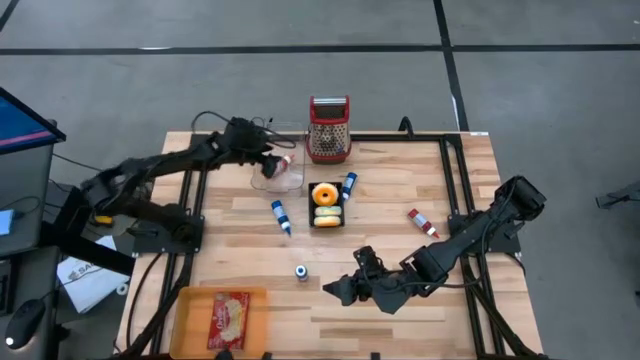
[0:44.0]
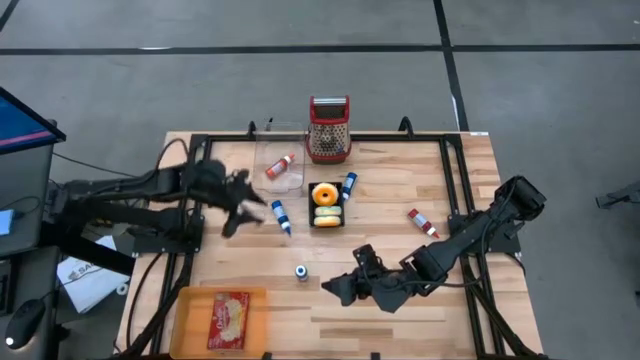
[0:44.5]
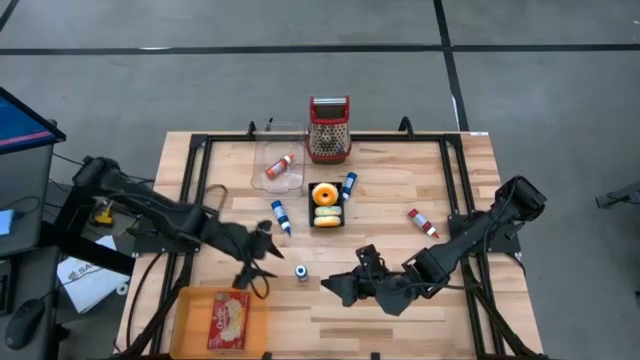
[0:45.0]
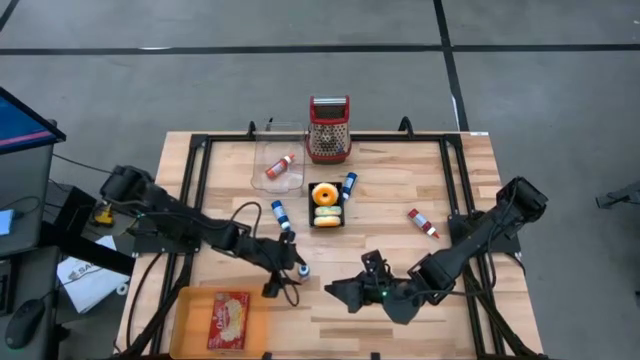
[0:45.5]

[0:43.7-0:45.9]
Put the bottom blue food coloring bottle into the transparent bin

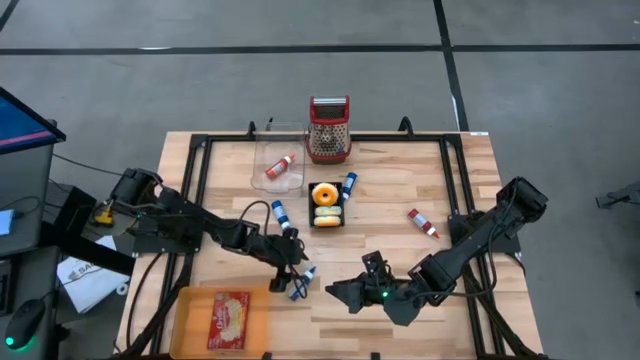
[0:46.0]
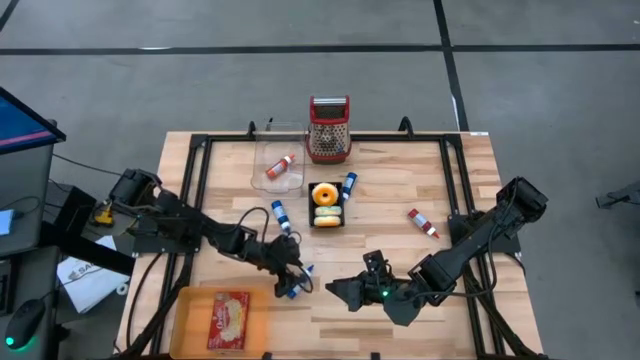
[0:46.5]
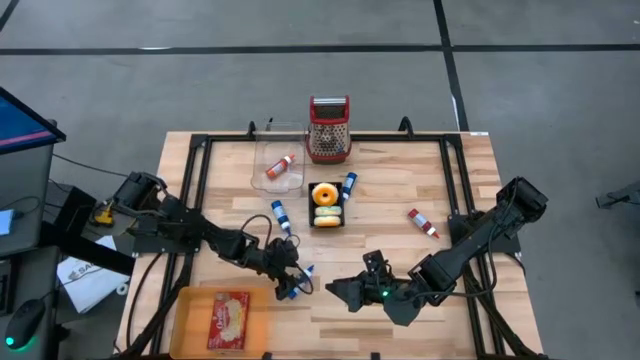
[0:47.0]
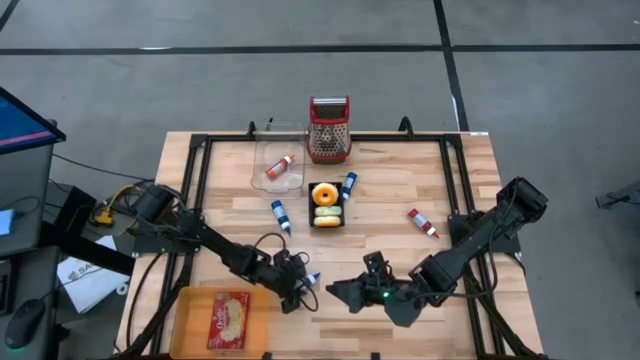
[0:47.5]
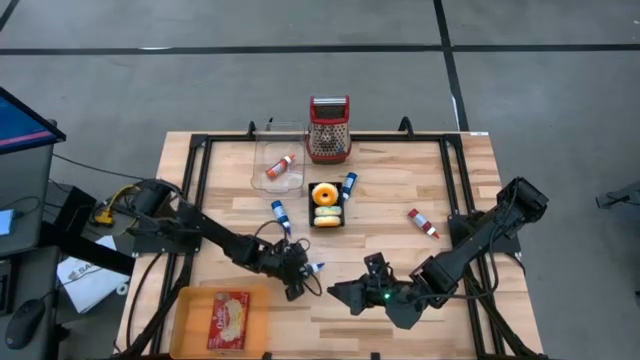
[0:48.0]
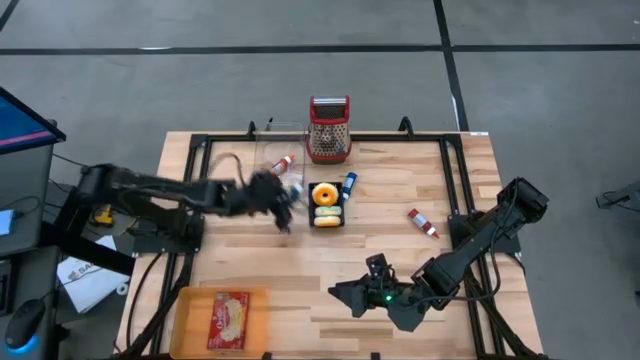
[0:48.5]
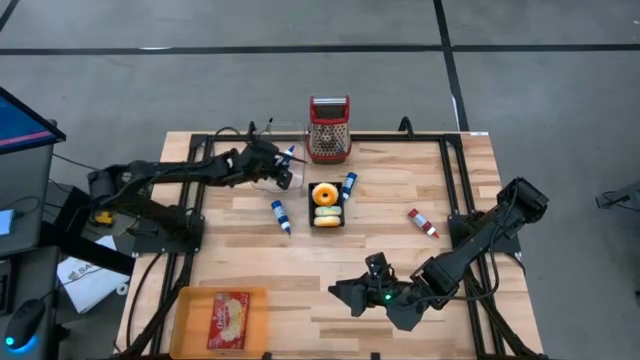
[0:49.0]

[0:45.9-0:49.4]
Put the bottom blue food coloring bottle into the transparent bin

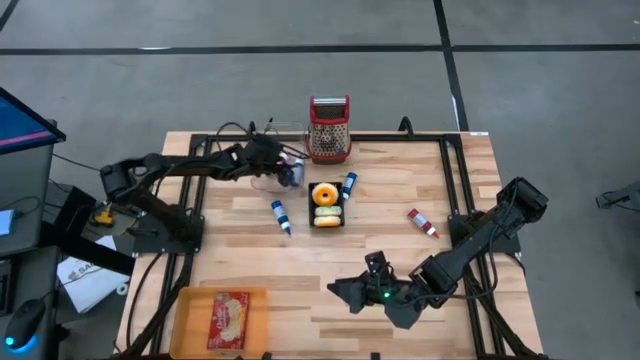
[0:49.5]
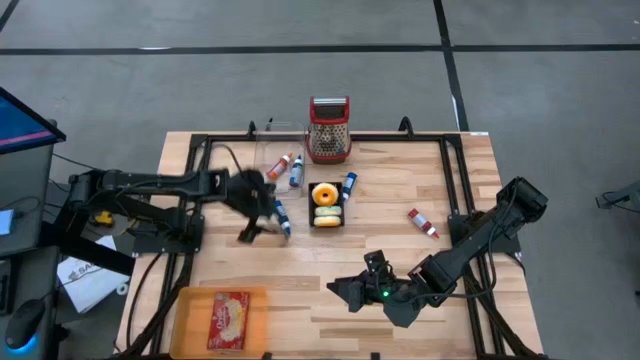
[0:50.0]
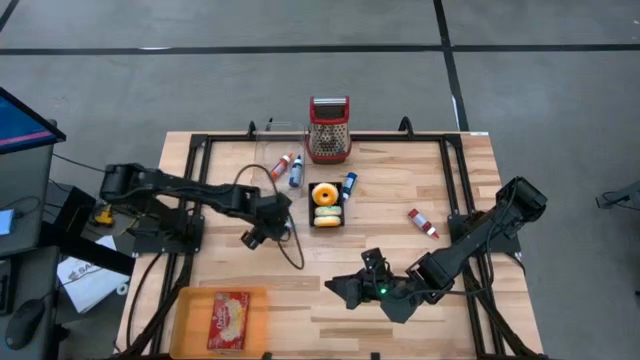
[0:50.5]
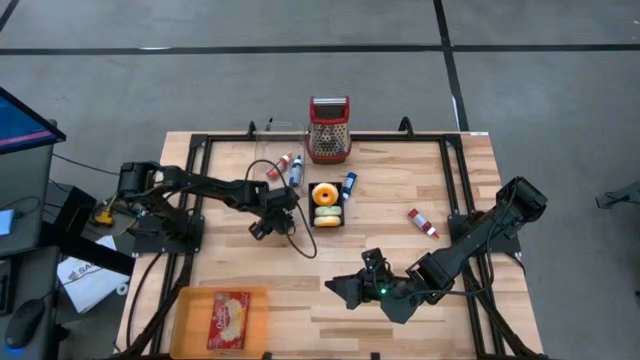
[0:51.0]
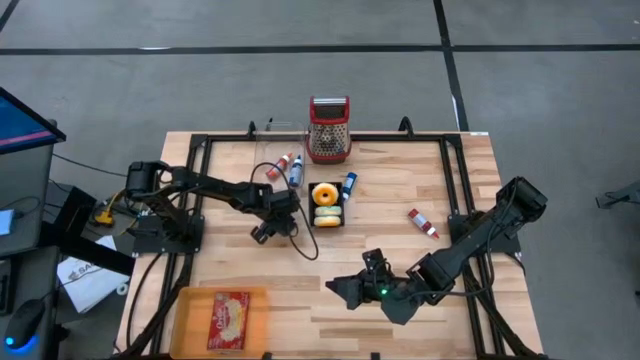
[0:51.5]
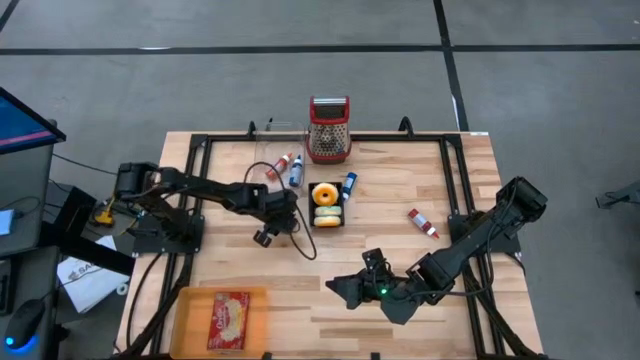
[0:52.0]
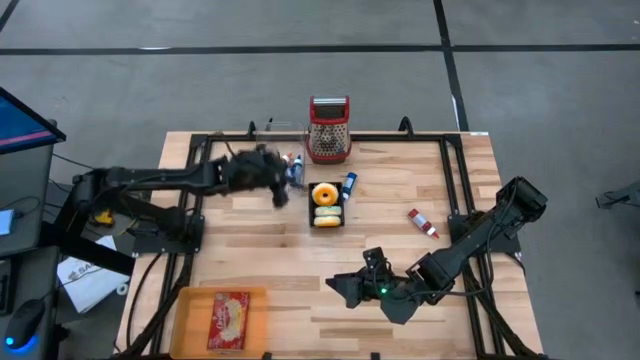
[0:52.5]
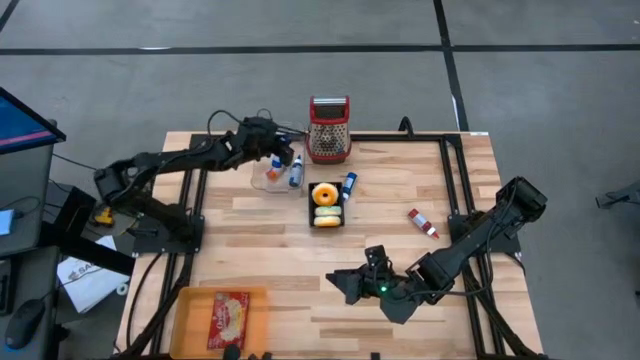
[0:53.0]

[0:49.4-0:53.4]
Put the bottom blue food coloring bottle into the transparent bin

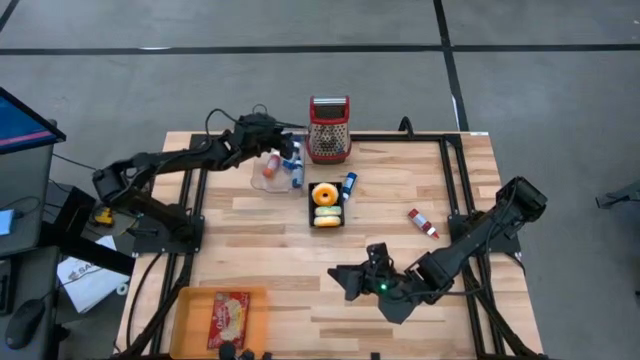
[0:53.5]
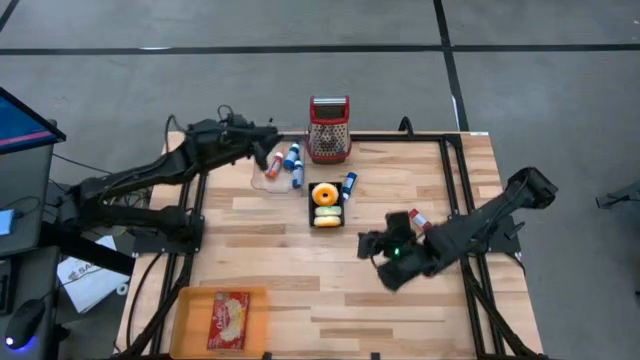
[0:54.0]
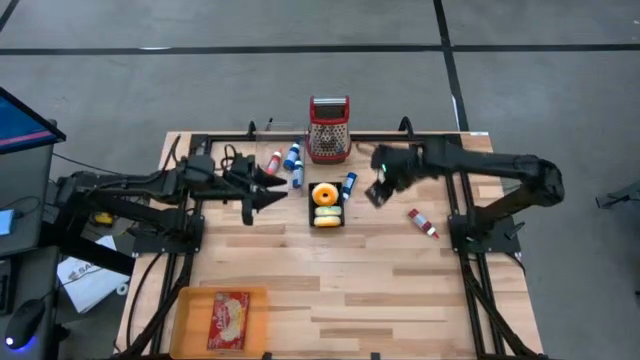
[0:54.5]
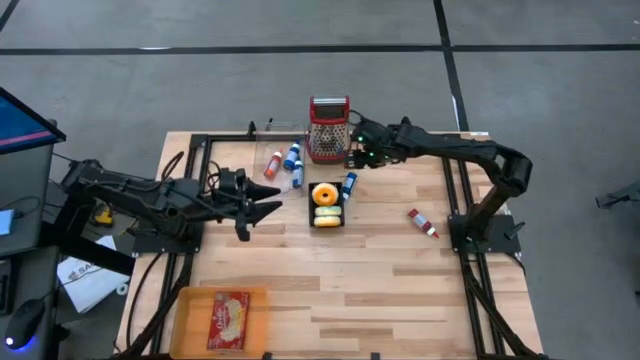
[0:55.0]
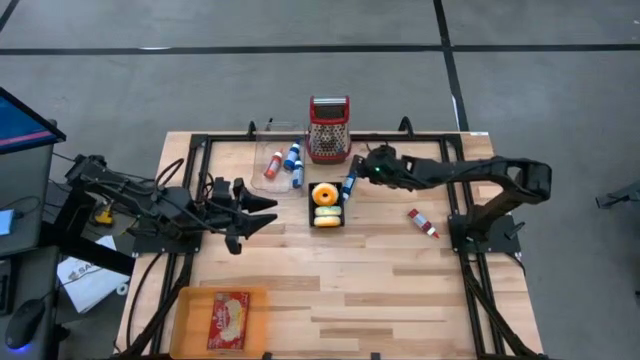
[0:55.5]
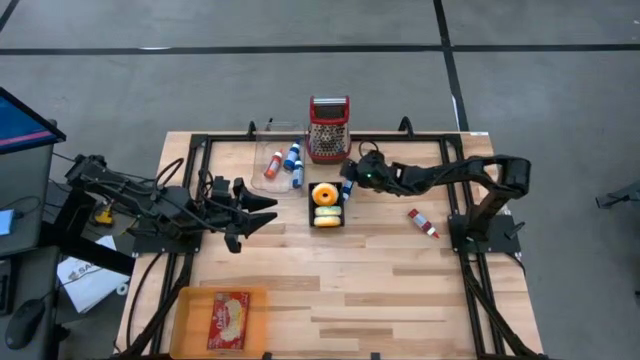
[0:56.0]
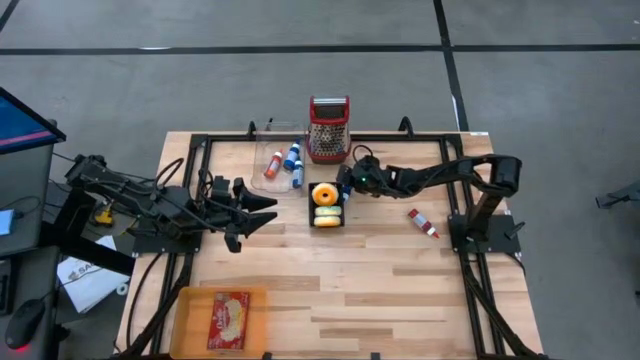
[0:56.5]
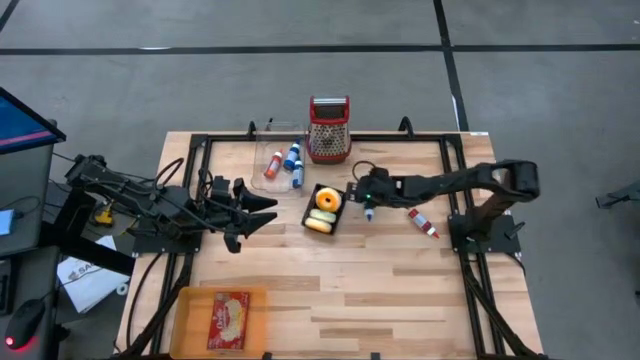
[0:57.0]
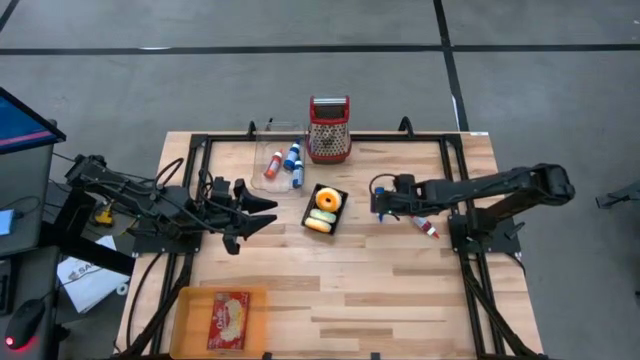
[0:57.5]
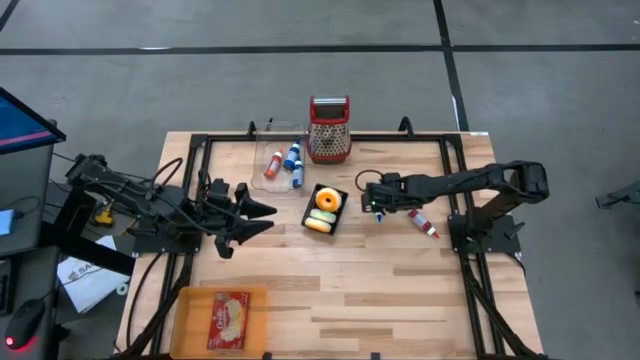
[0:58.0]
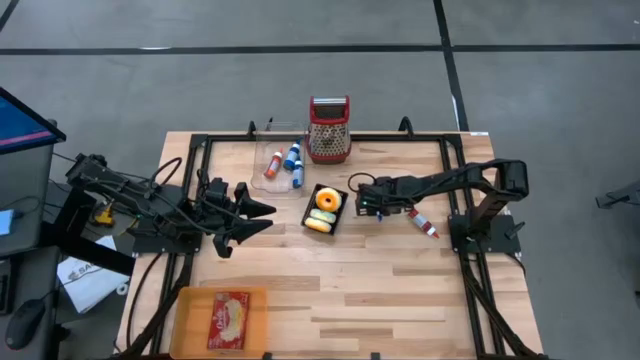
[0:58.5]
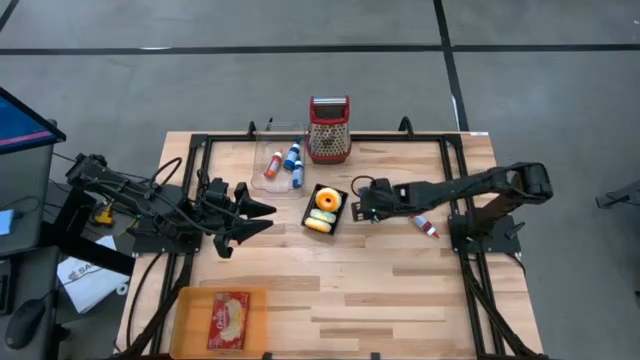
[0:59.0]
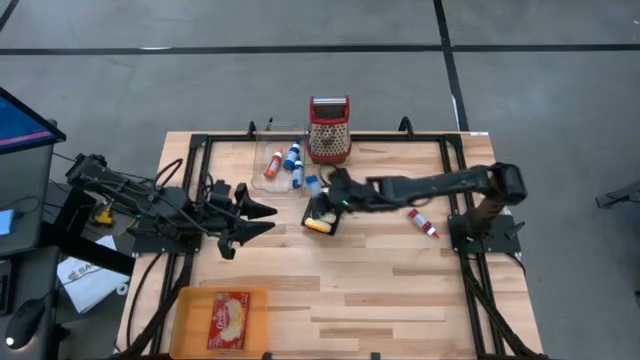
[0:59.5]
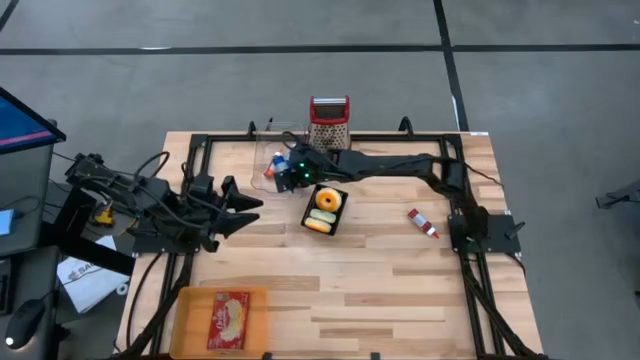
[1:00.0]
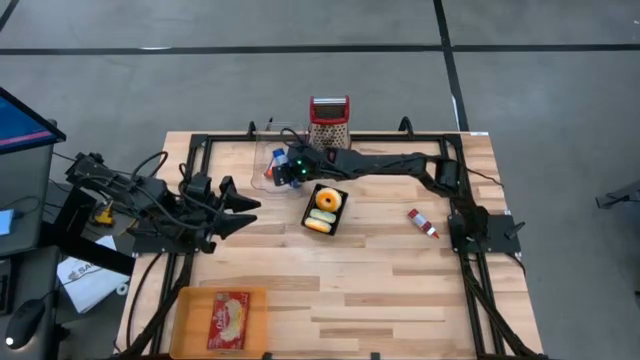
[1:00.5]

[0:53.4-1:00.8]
Put the blue food coloring bottle into the transparent bin

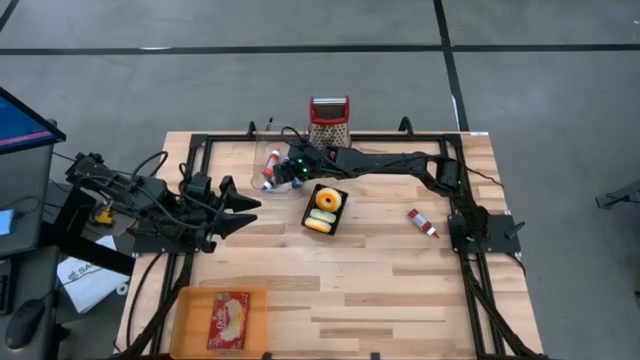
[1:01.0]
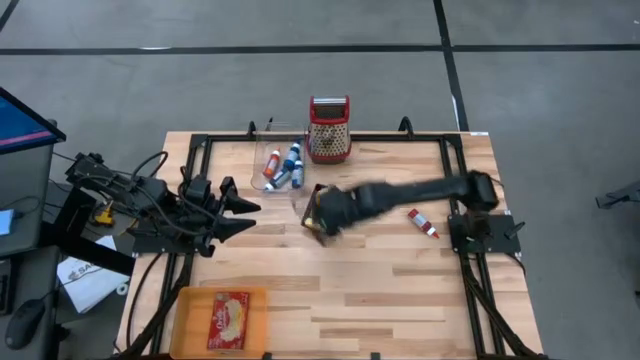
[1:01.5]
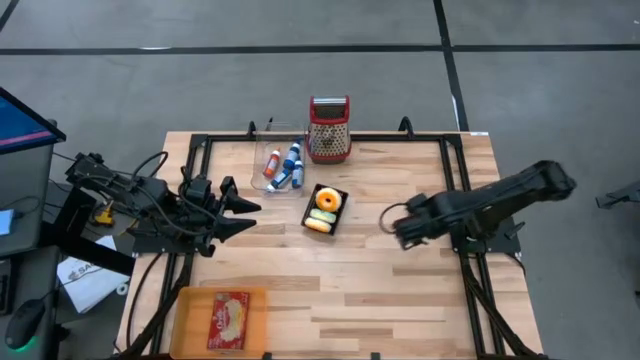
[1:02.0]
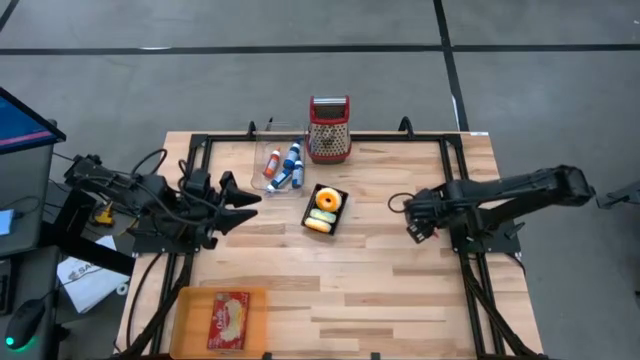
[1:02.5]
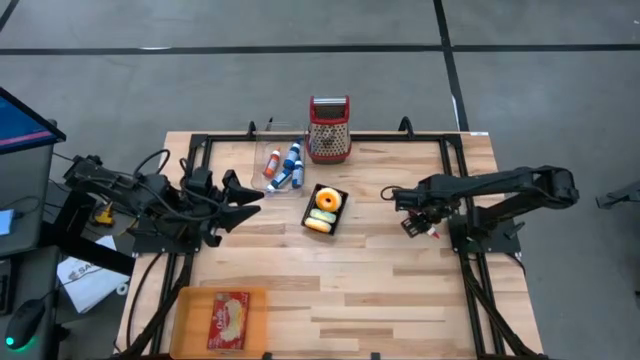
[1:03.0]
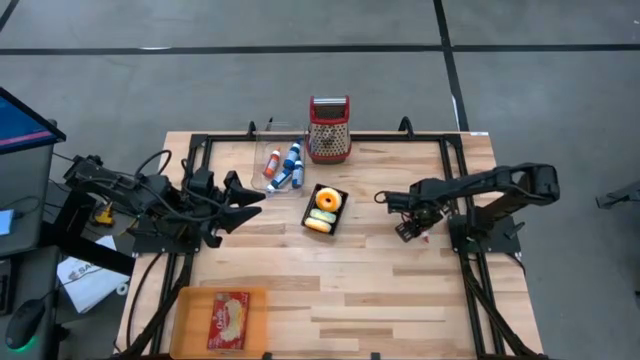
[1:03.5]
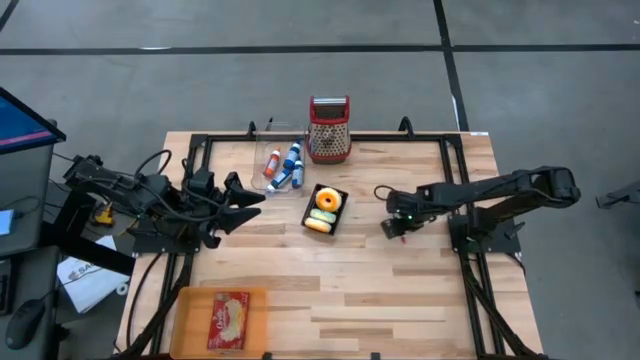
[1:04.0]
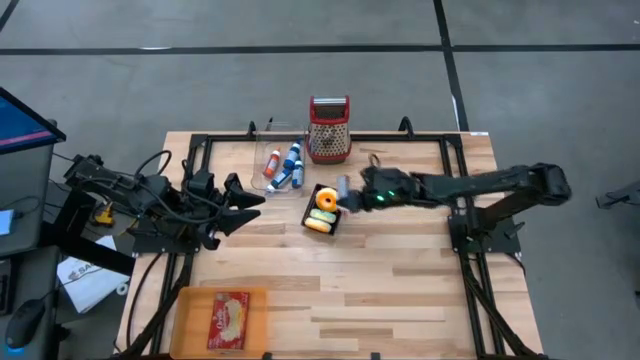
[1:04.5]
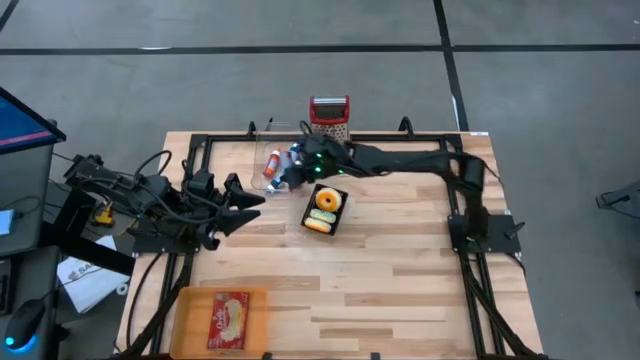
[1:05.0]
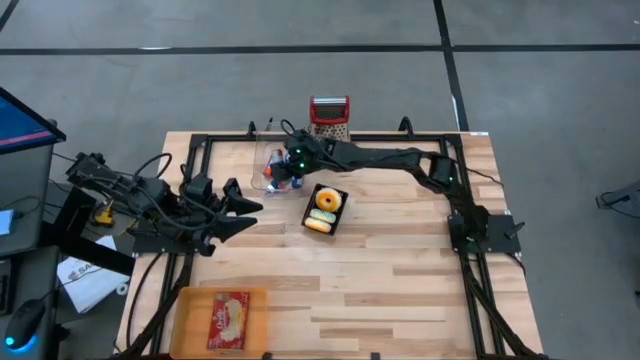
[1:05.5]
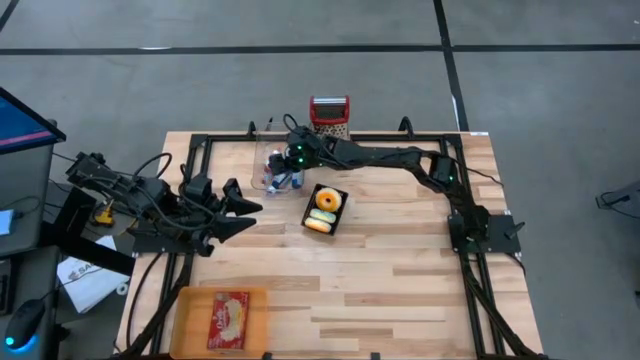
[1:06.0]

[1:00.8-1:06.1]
Put the red food coloring bottle into the transparent bin
